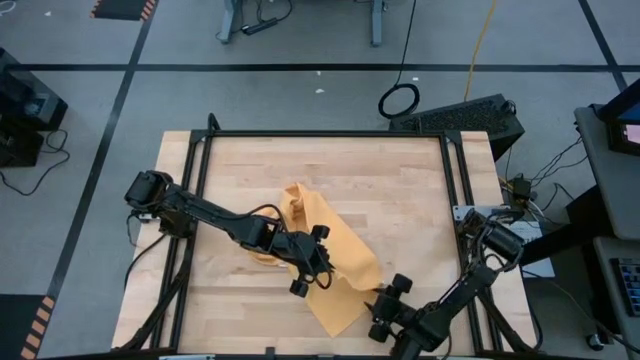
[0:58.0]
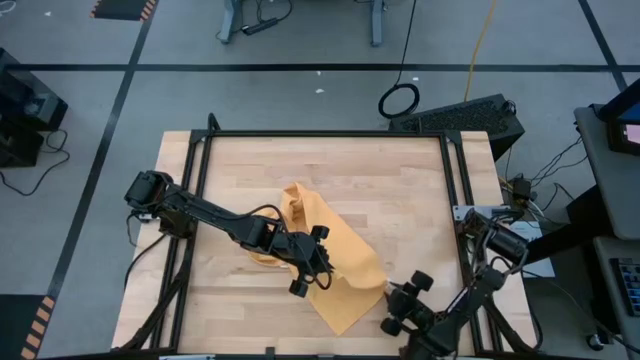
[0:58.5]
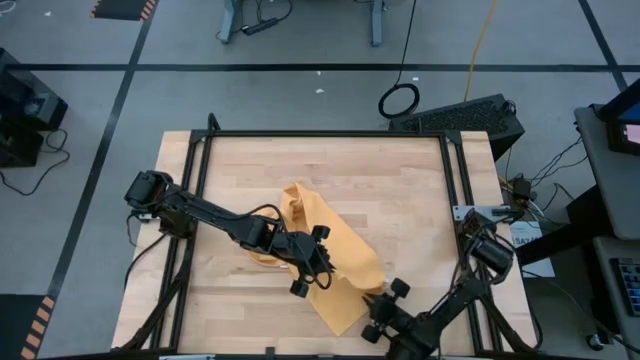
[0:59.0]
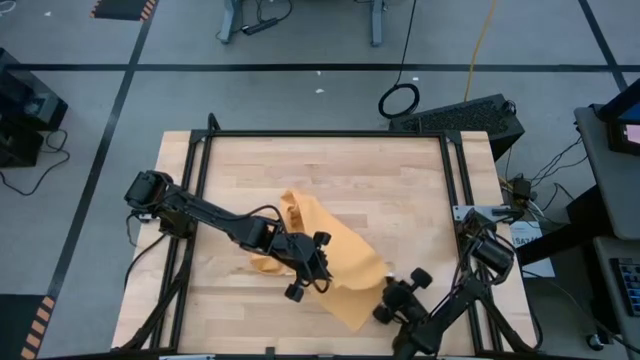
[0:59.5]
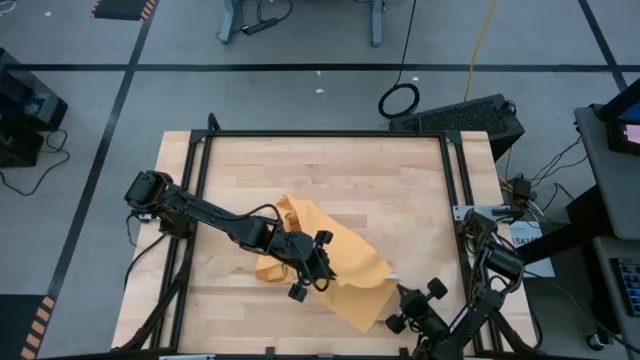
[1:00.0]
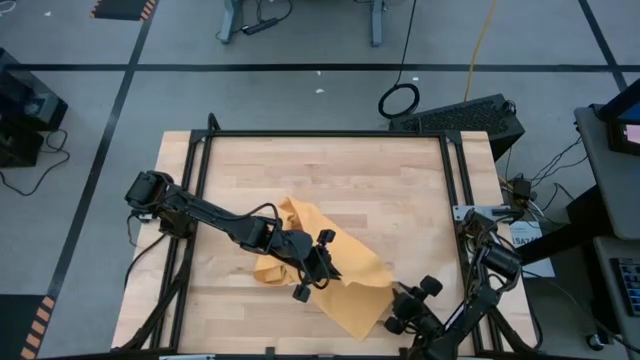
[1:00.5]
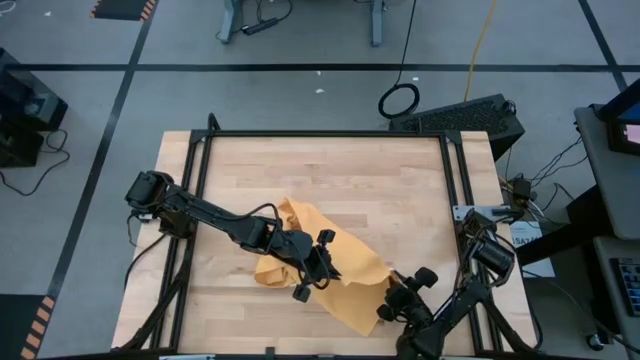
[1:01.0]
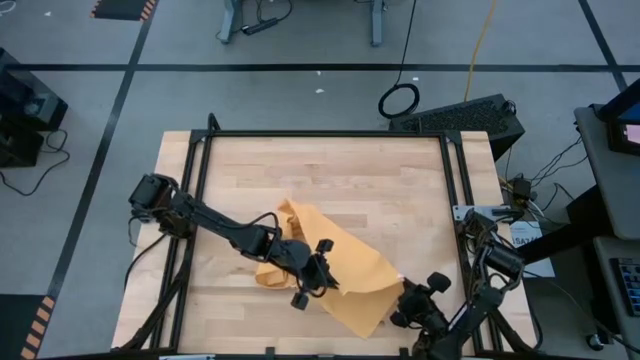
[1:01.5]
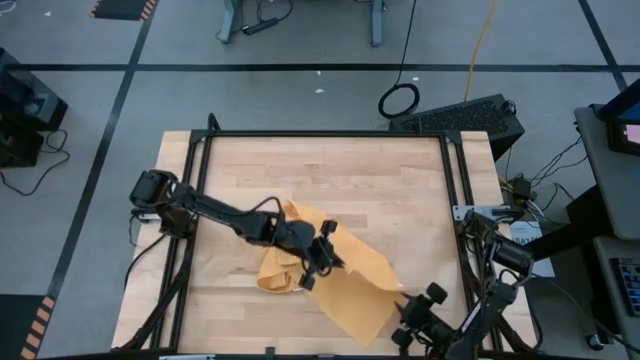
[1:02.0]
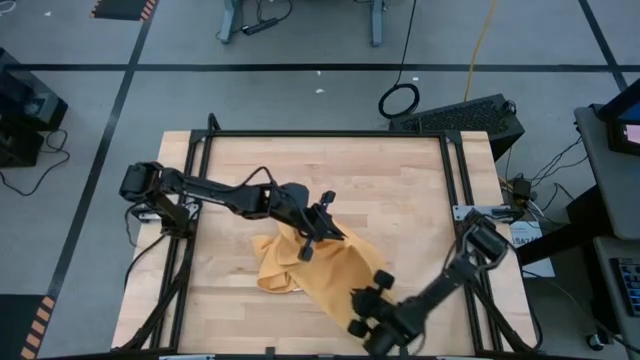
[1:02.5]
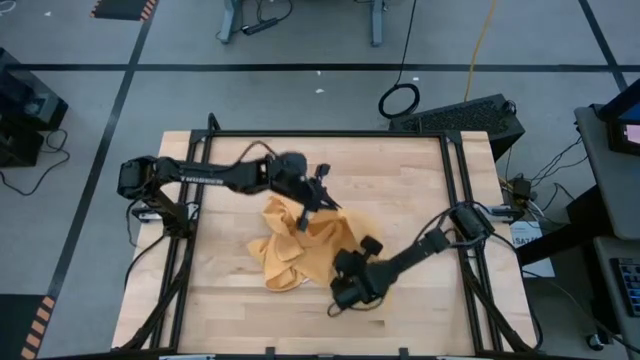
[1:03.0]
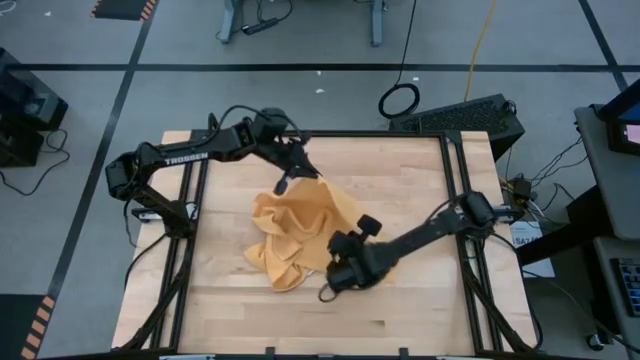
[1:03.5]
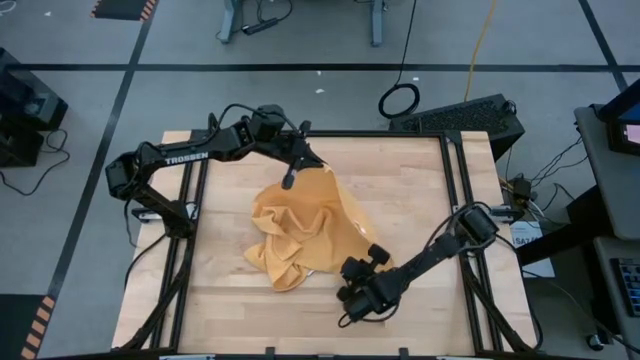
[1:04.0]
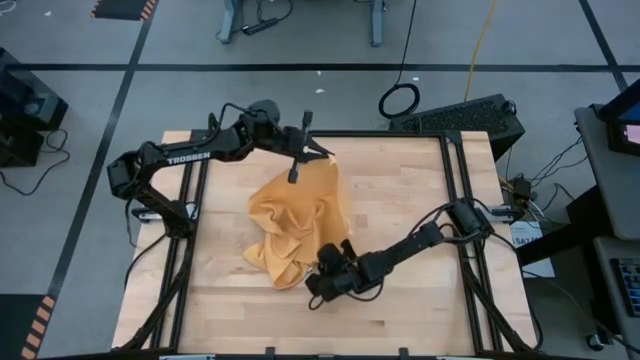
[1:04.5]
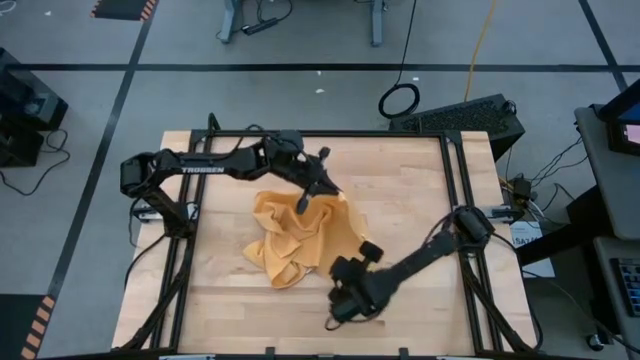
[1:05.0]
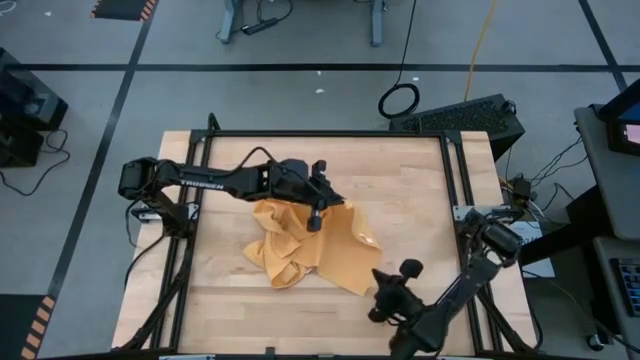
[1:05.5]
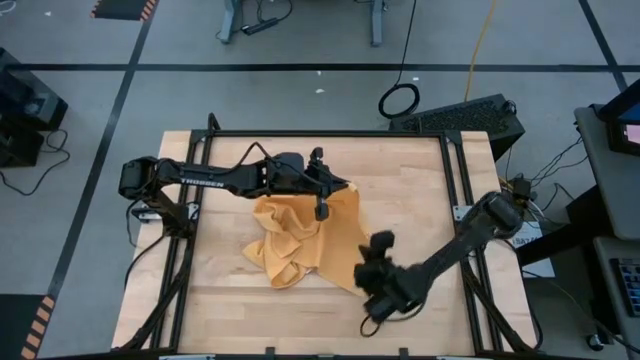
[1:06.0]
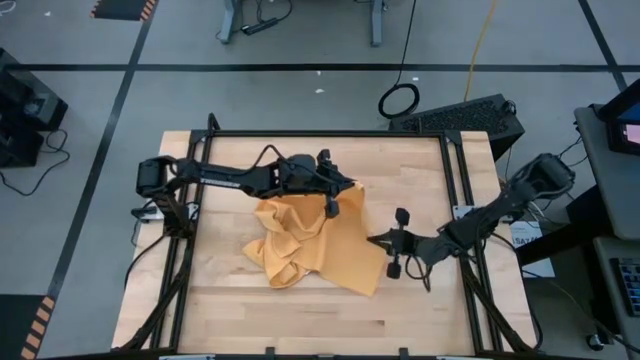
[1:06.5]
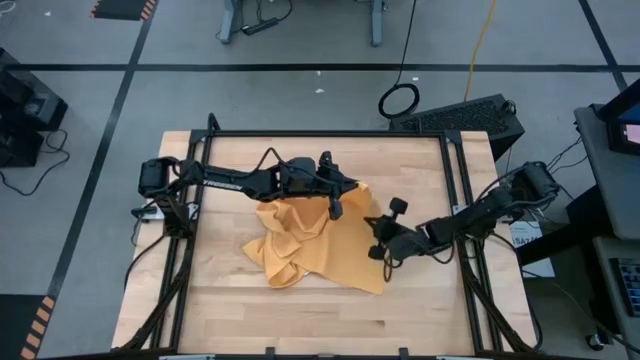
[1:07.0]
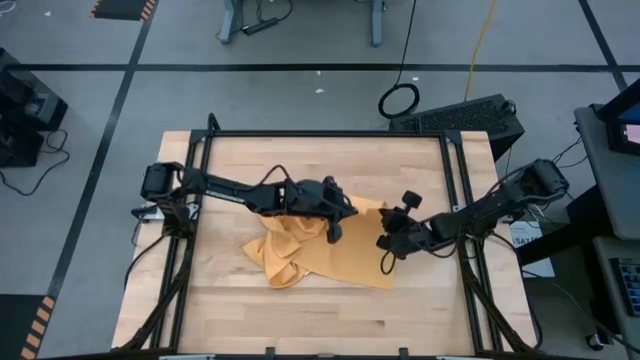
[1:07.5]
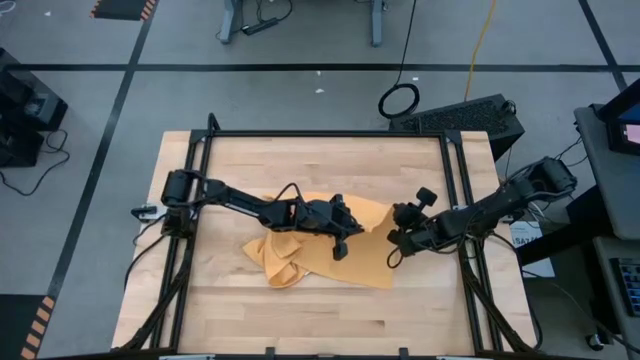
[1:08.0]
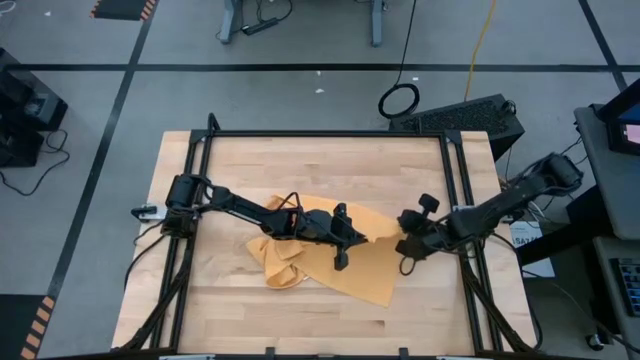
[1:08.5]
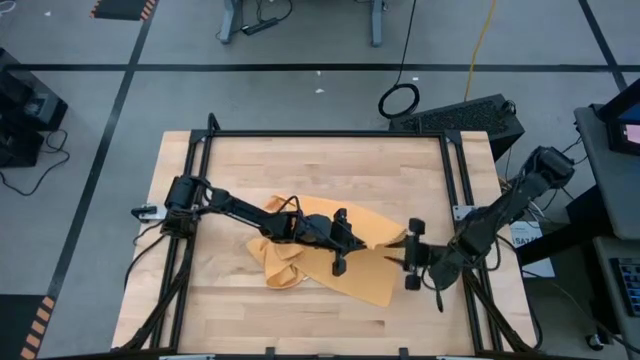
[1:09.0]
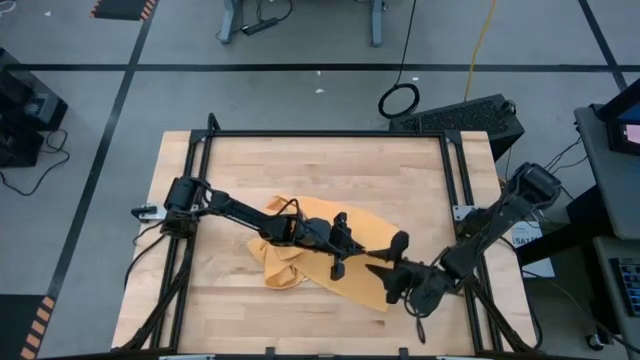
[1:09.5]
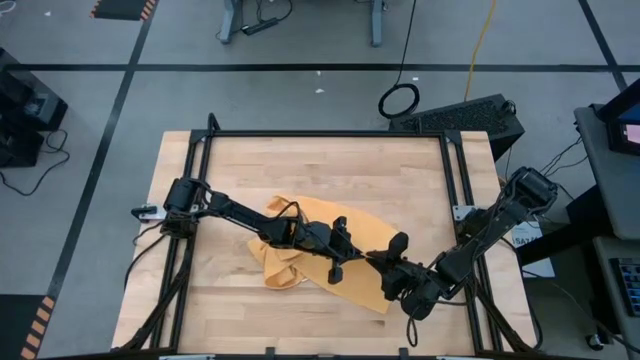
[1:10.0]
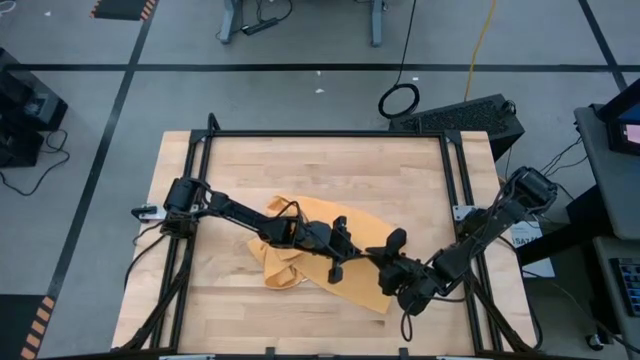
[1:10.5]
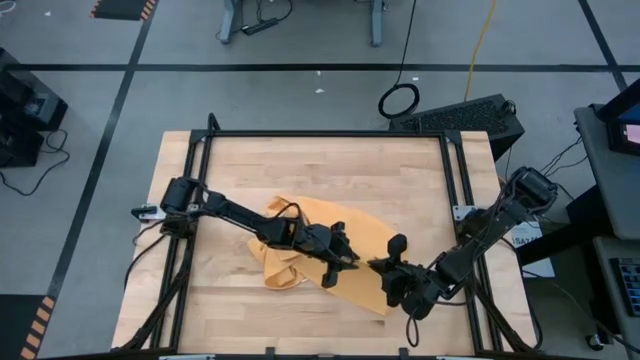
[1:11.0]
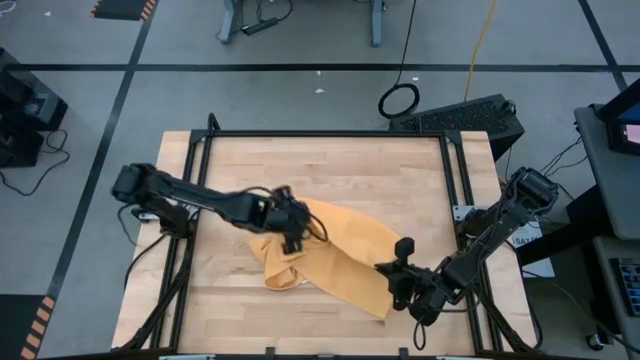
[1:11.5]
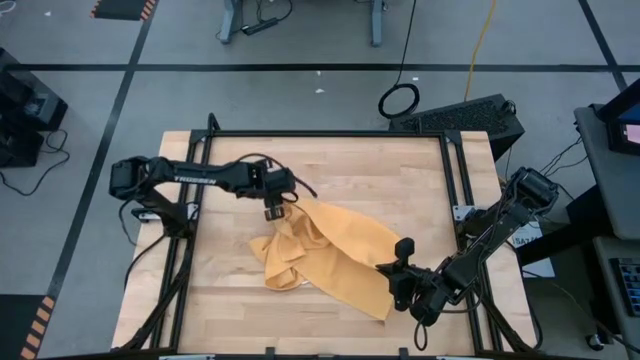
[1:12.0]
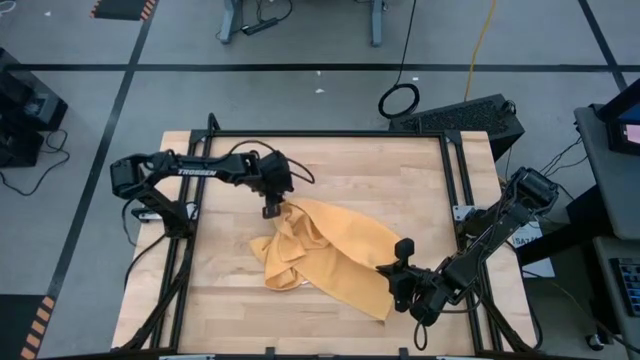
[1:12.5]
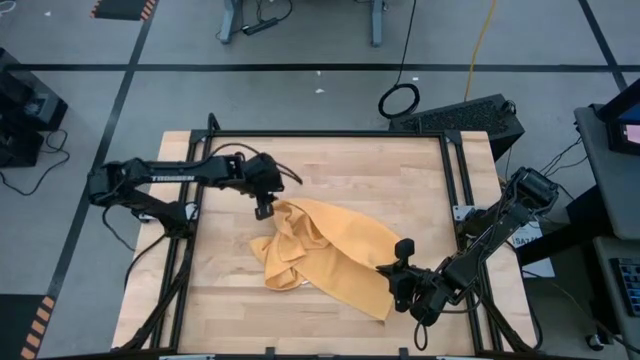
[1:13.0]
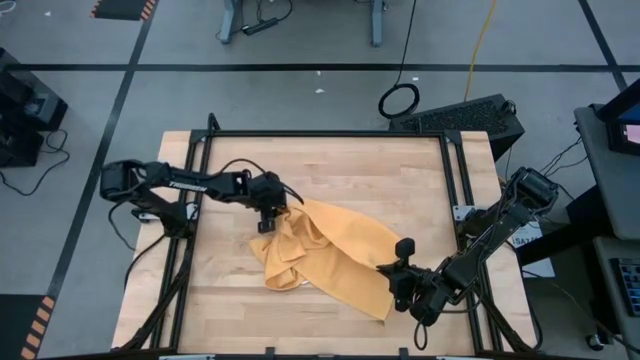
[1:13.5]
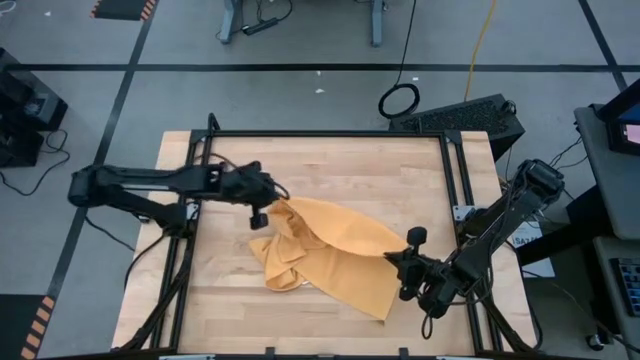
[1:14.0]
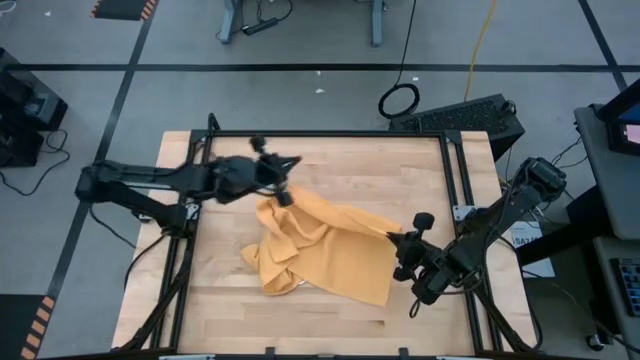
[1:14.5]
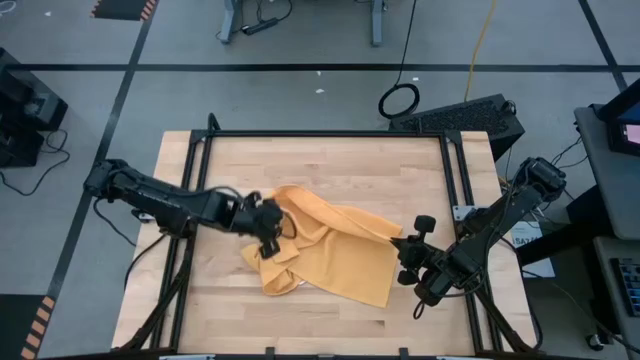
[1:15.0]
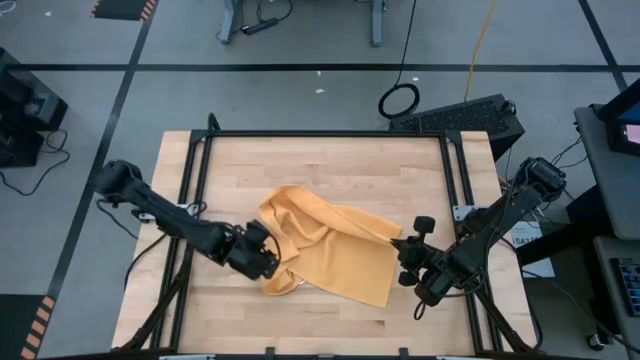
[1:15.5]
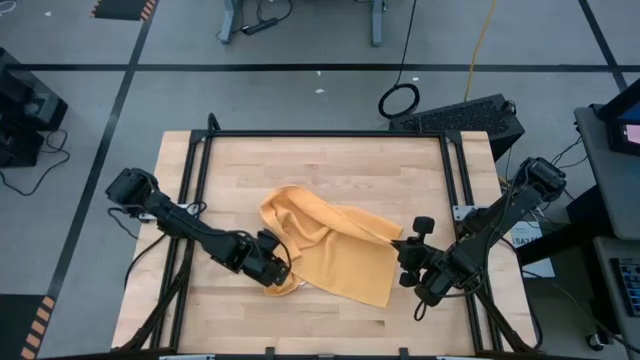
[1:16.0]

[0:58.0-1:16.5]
Task: Roll towel
Roll the yellow towel

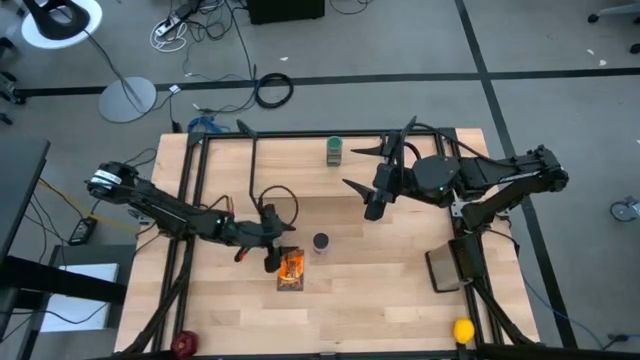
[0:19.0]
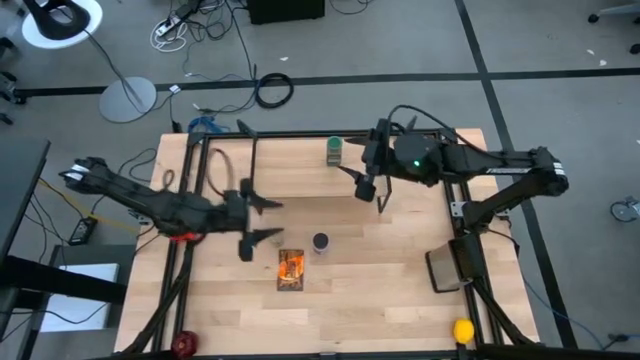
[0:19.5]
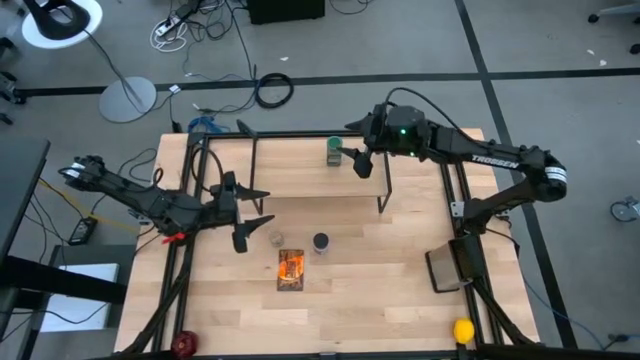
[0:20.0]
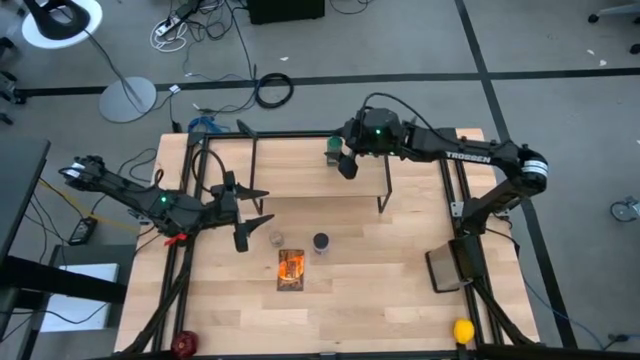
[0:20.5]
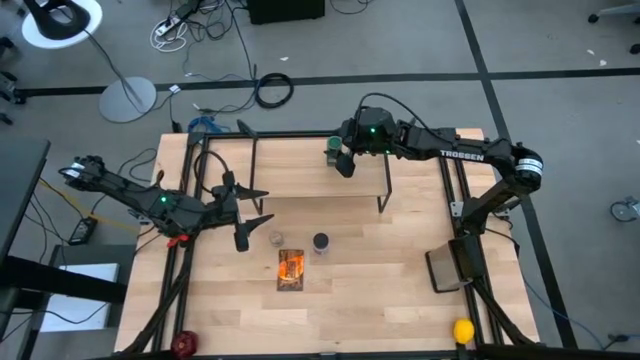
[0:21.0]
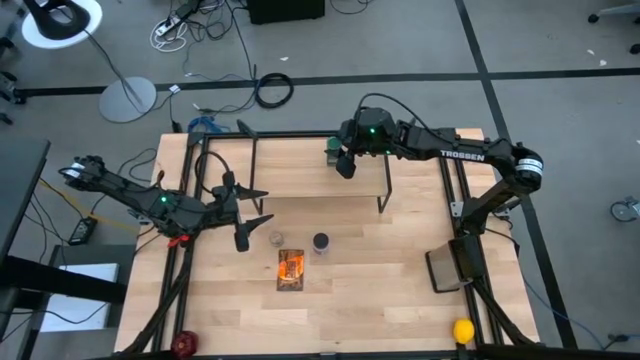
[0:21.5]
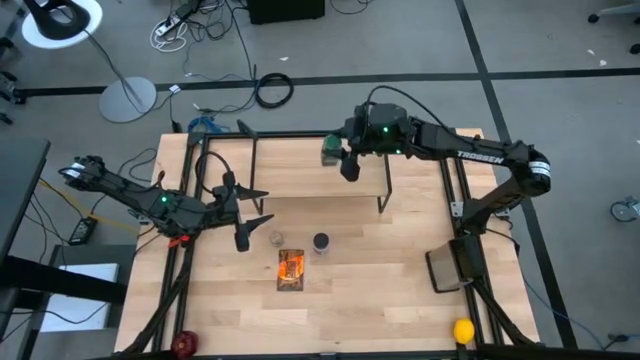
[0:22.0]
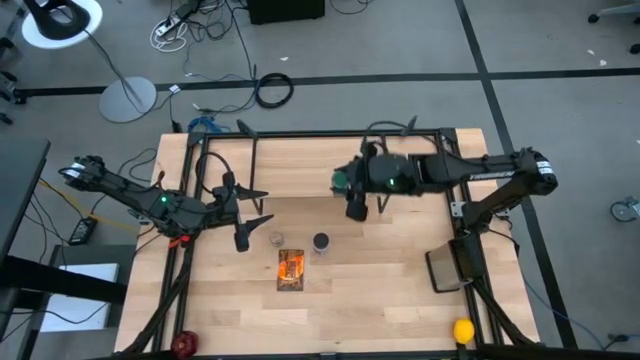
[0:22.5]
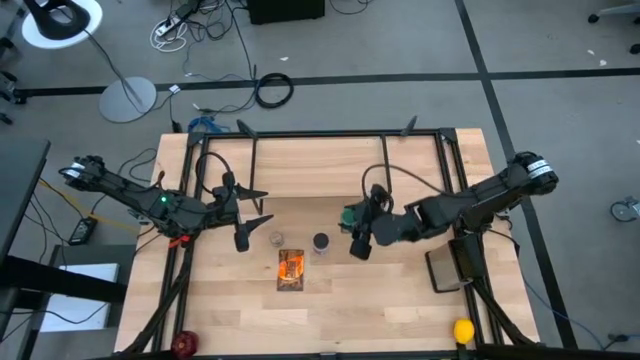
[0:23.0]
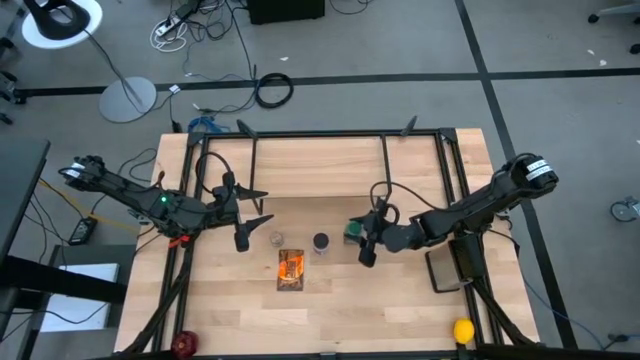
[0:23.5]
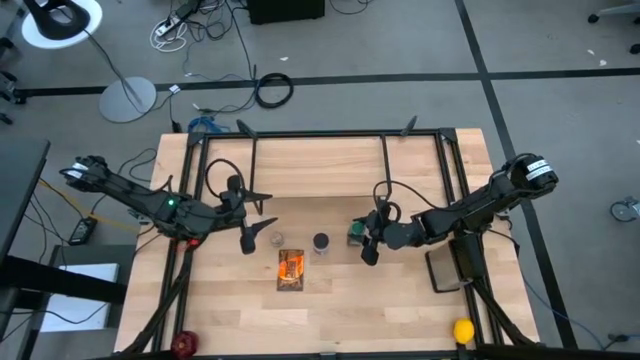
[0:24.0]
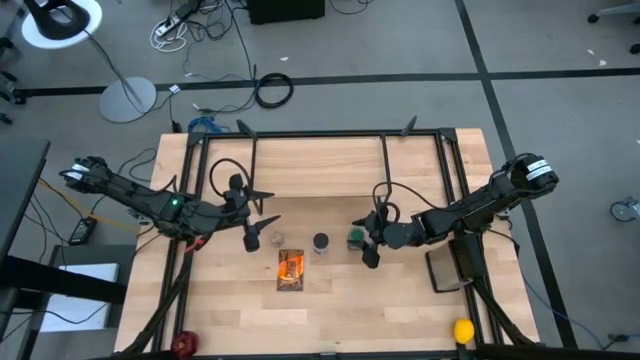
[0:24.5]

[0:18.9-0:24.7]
Task: Shelf spices
Remove the green seasoning bottle from the shelf
